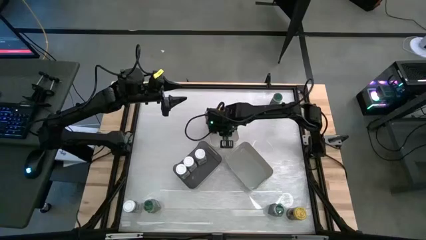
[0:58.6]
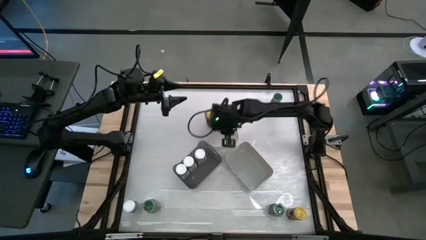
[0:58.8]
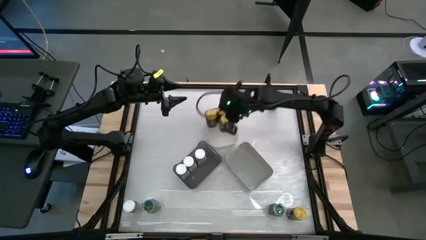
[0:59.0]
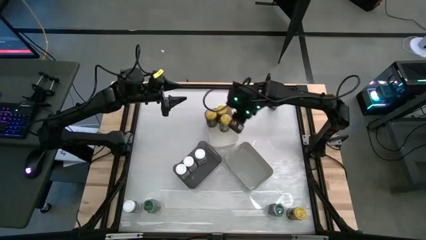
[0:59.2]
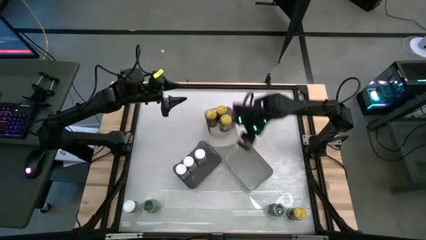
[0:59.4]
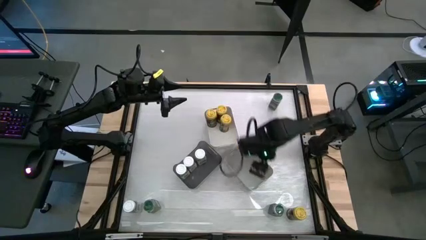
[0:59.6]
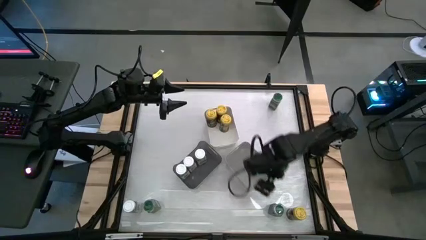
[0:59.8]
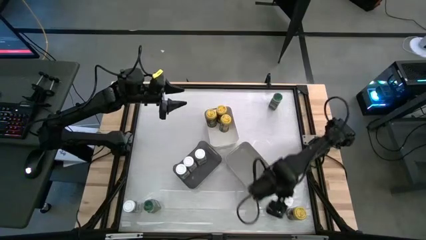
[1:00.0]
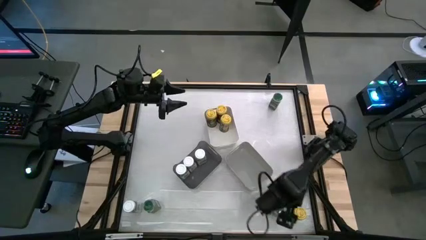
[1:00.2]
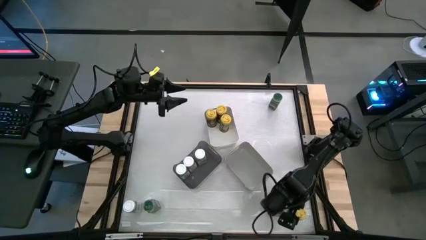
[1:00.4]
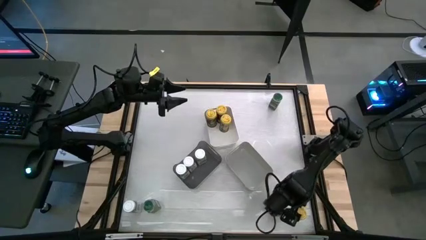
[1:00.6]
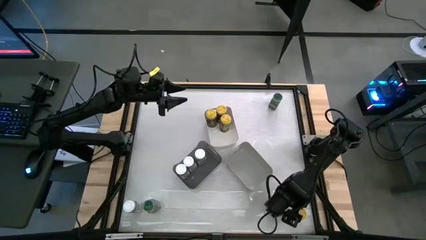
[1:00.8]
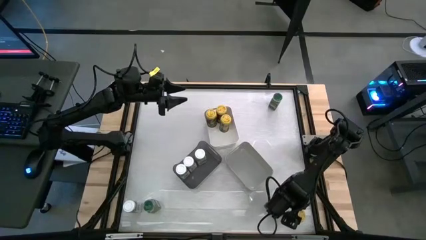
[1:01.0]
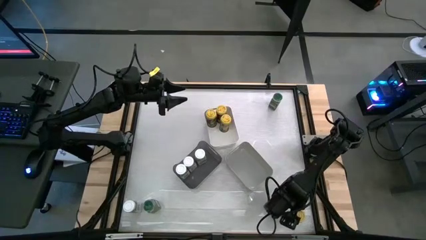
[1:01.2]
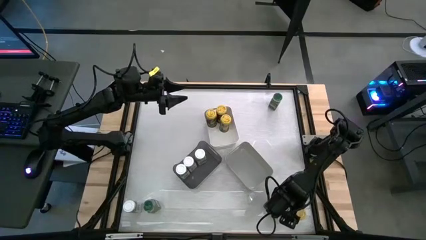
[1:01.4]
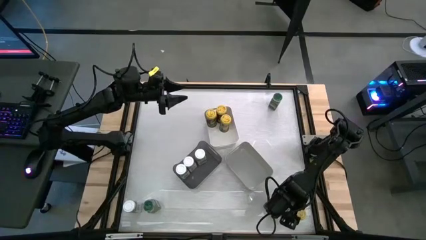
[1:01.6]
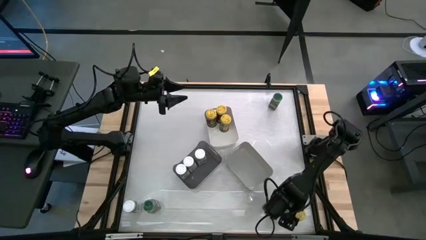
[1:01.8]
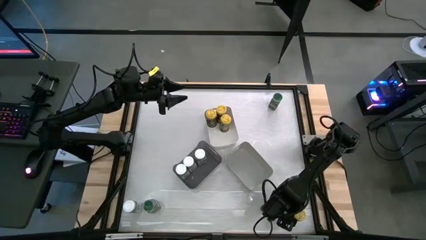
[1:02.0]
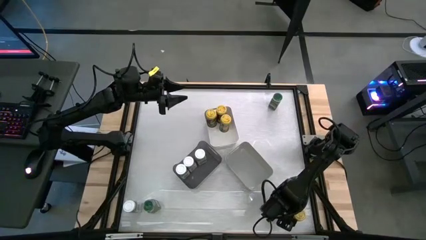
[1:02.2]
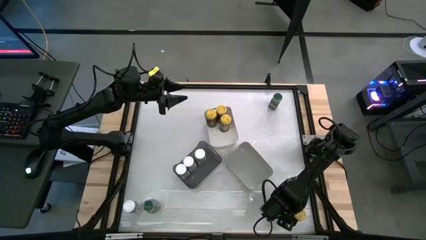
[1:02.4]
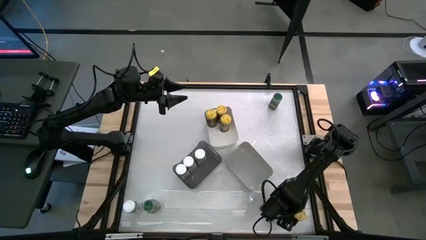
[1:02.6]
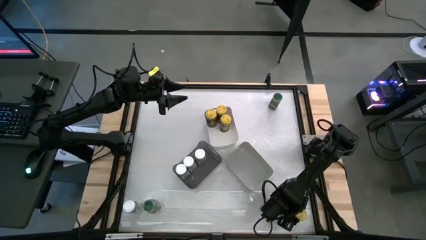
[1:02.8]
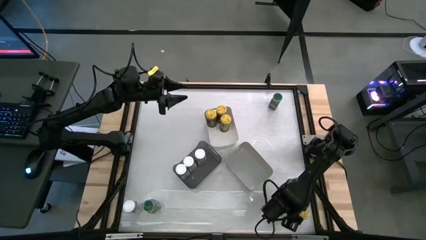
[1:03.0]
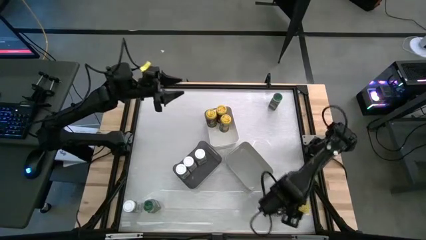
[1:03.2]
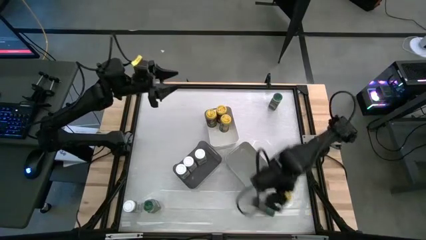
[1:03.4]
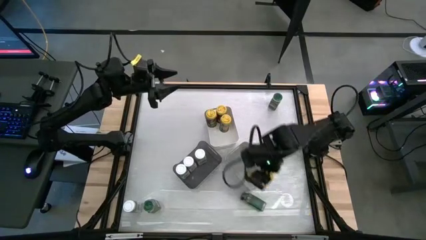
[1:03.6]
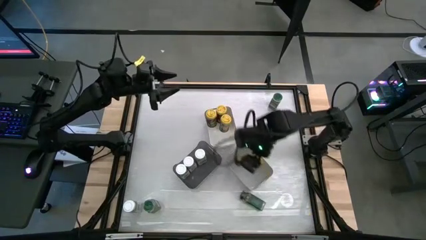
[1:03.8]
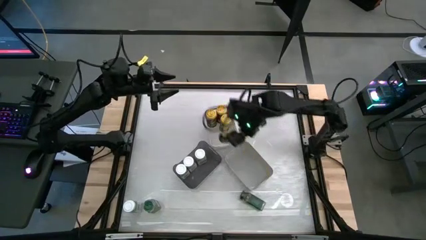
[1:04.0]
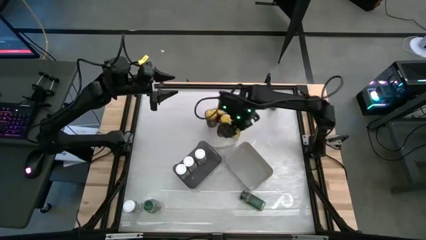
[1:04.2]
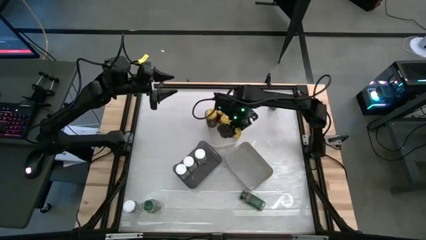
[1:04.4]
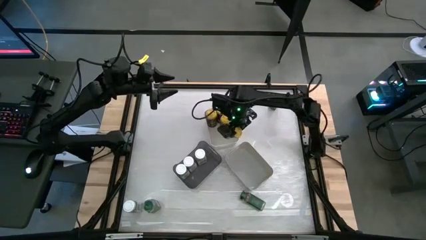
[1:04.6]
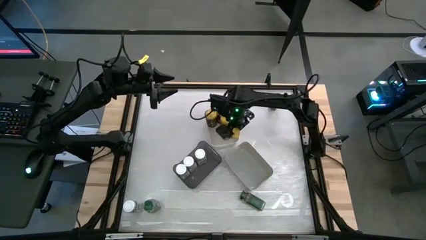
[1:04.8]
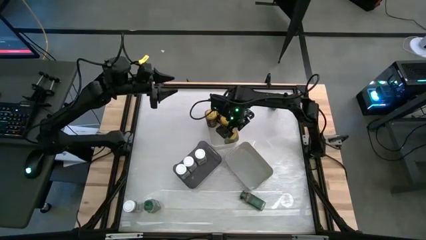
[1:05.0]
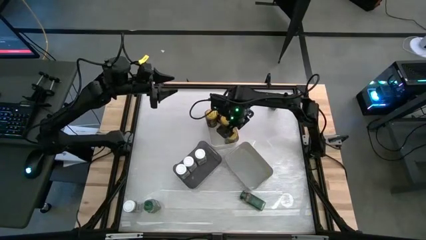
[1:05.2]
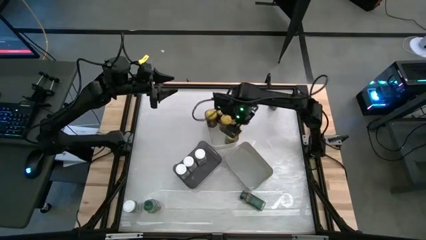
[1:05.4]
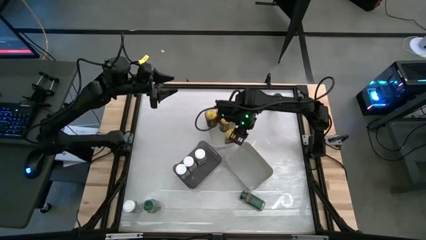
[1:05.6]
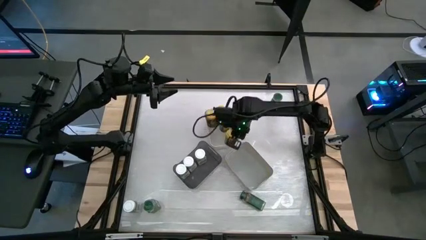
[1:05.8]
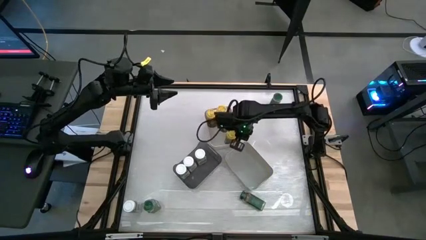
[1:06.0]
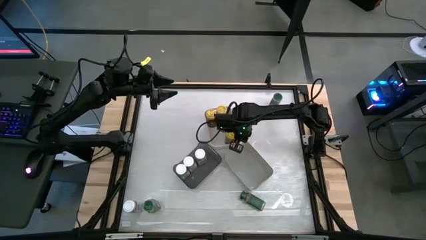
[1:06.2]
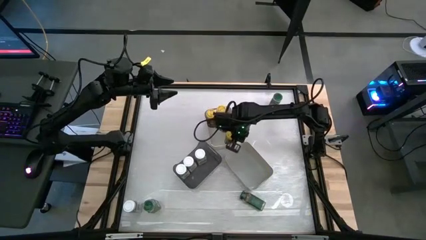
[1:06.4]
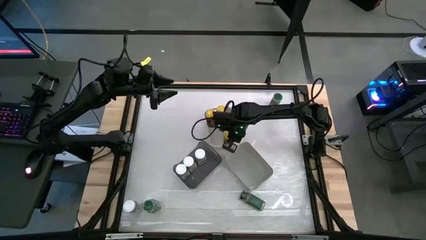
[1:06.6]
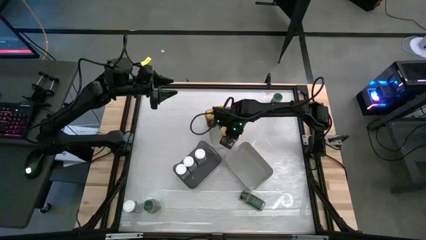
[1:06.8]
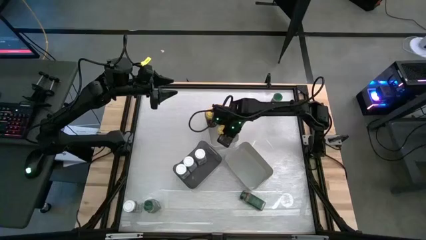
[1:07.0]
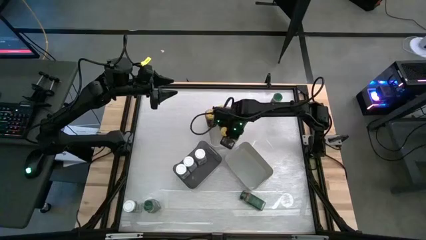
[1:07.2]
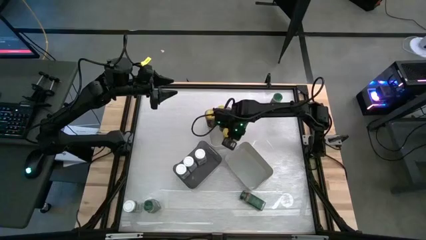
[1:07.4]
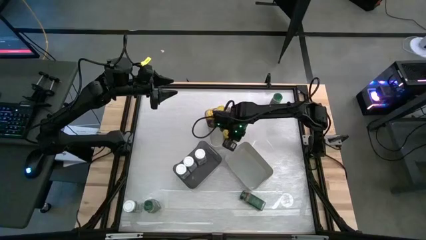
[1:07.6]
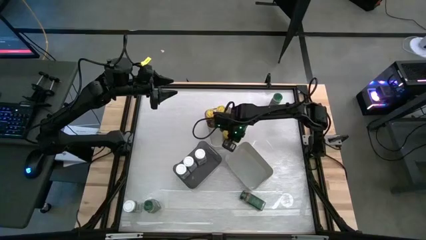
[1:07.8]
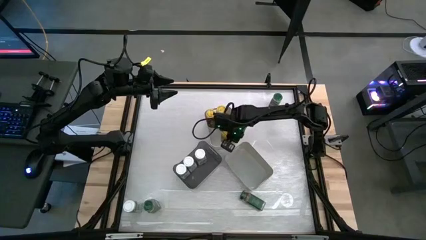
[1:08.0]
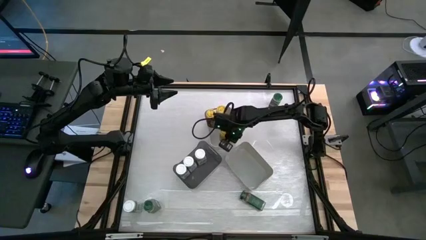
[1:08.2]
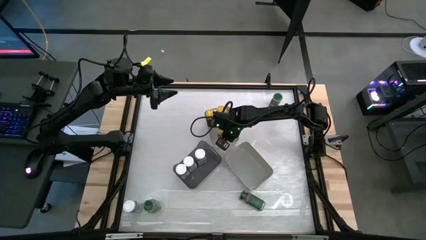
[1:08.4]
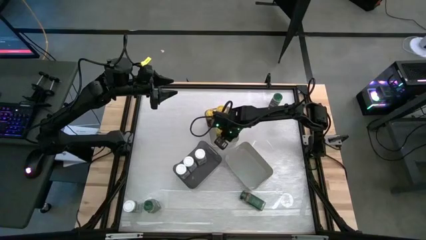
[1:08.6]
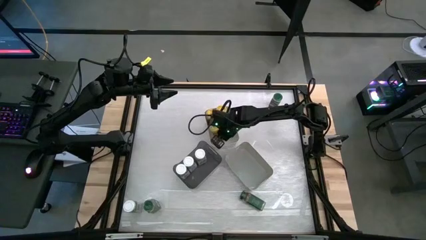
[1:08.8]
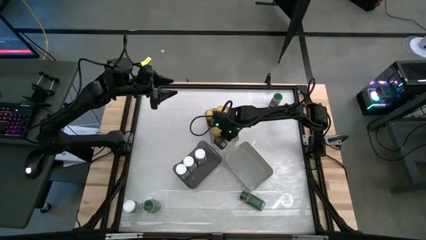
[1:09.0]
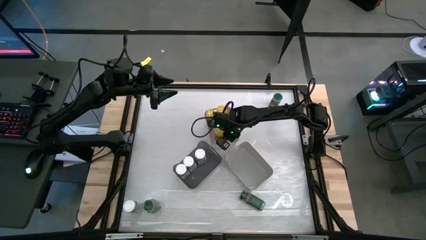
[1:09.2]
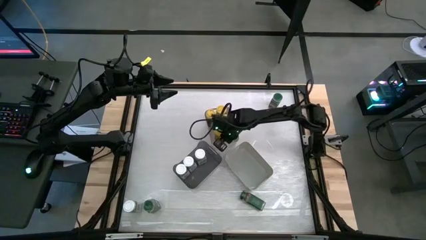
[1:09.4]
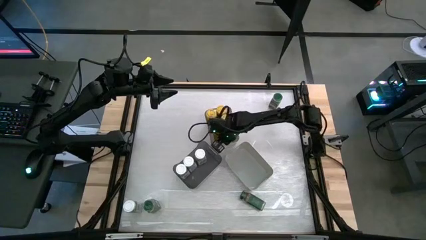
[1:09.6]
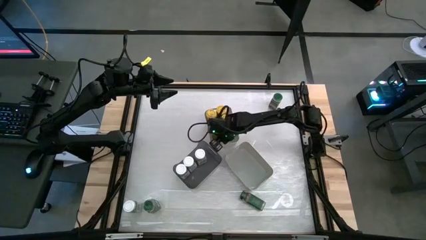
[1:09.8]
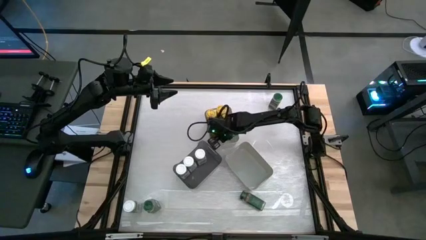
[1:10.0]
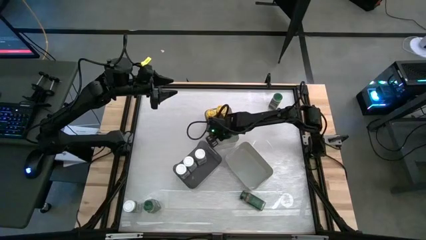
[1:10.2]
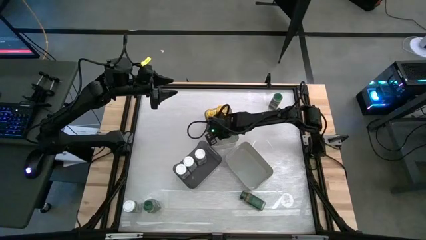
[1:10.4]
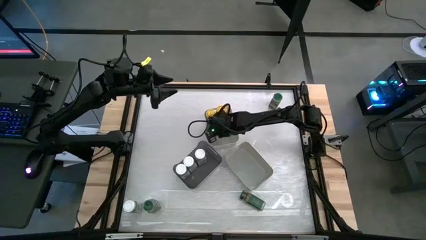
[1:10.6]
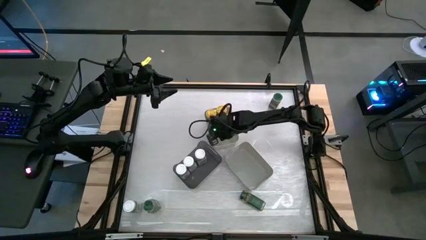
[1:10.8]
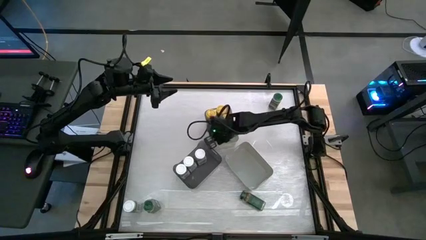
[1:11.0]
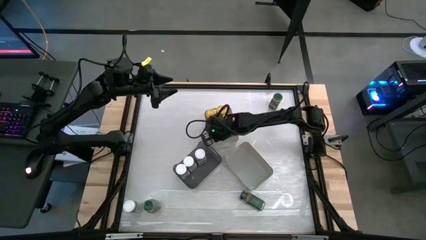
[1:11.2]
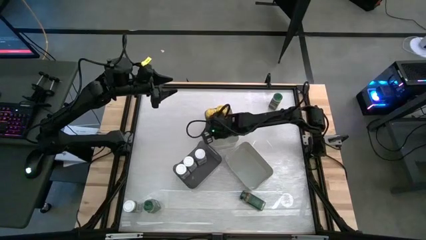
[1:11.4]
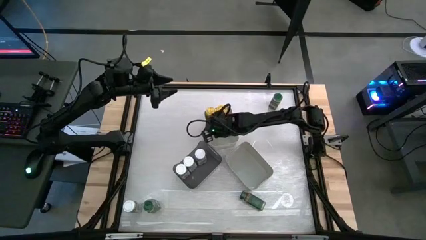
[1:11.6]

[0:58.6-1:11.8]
Task: Sort spices by type
Put the yellow seasoning bottle into the white bin
